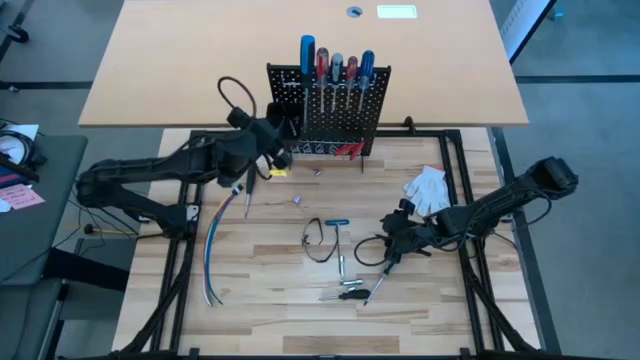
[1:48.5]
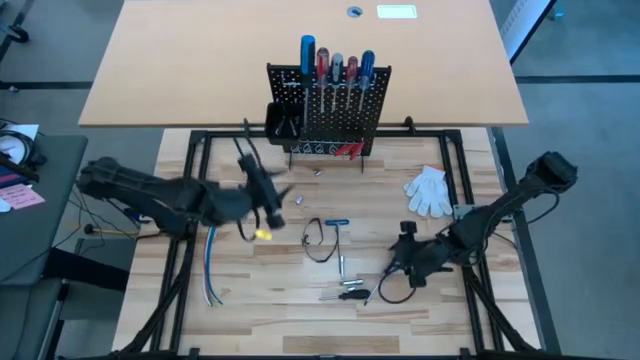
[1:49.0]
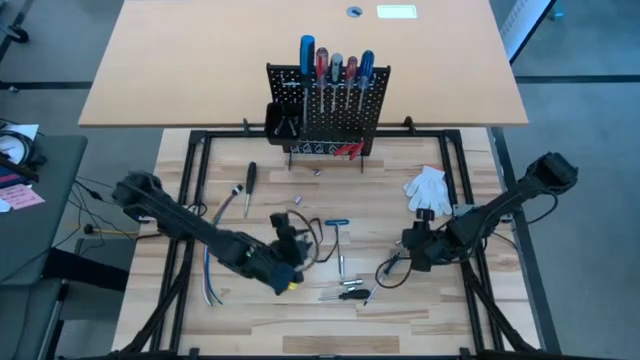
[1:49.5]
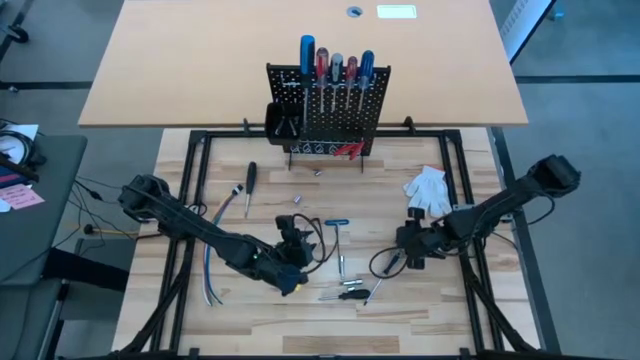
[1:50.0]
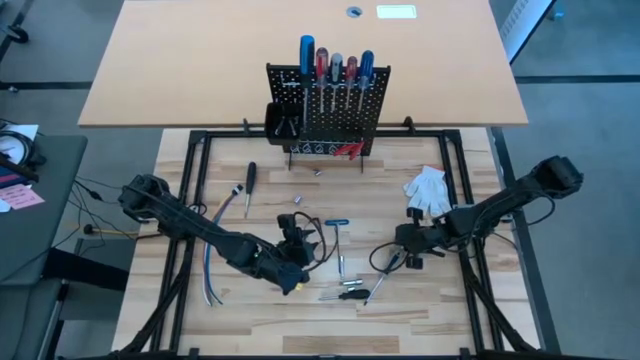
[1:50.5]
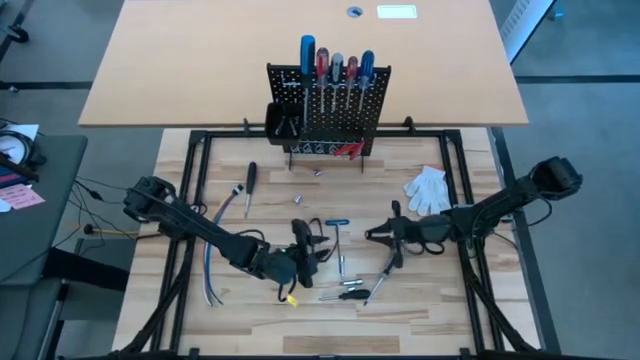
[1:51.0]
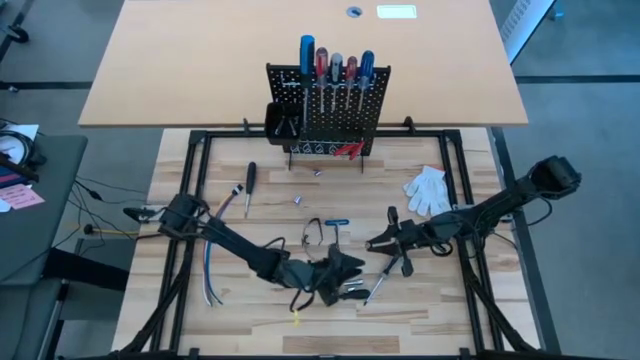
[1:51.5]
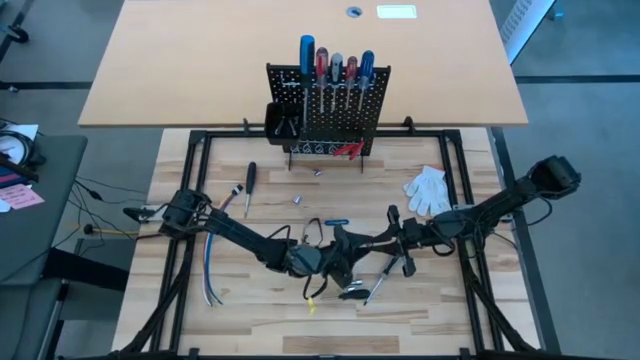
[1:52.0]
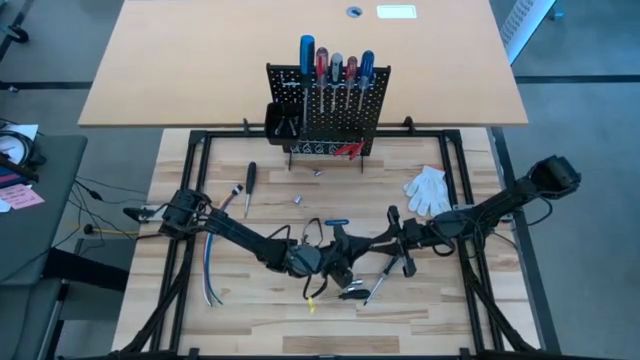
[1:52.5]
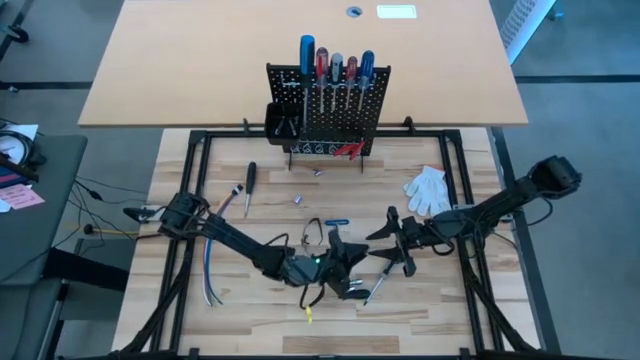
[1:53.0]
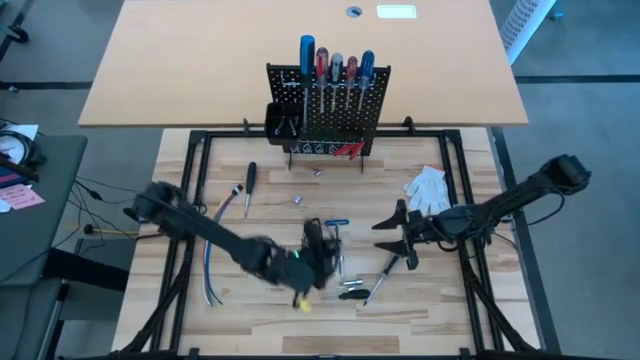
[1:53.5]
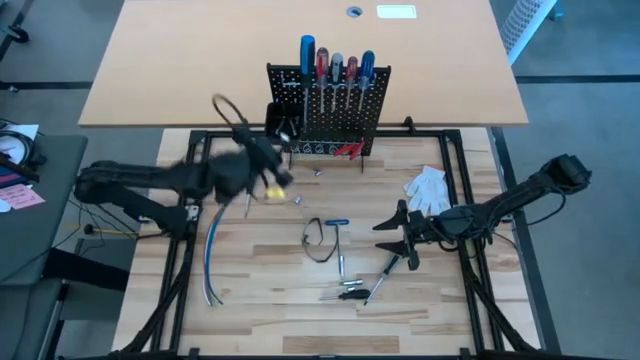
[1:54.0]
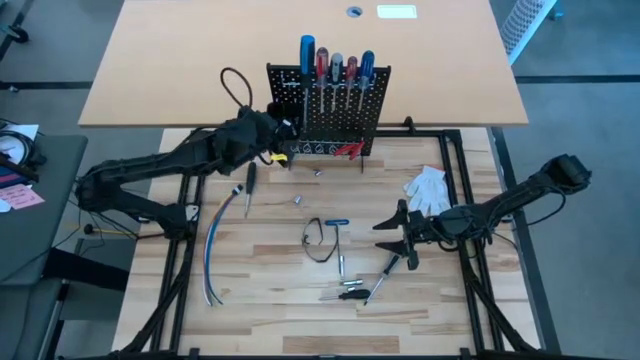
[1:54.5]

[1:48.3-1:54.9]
Task: Hang tools onto peg board
Put the silver socket into the black bin on the black pegboard

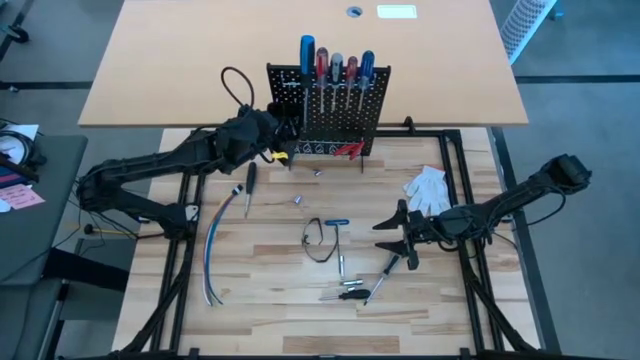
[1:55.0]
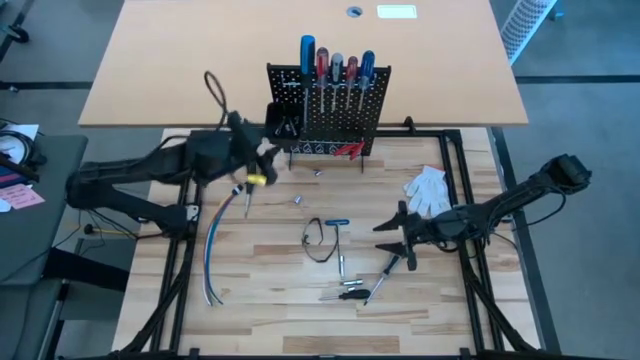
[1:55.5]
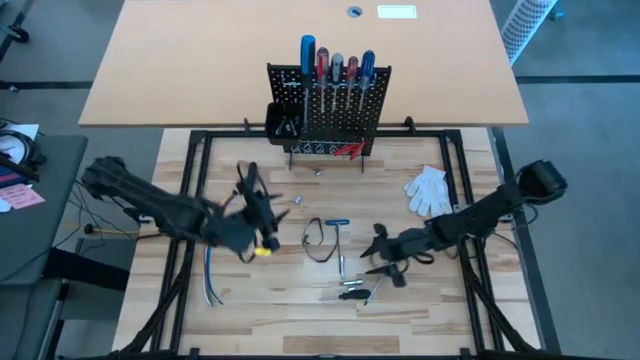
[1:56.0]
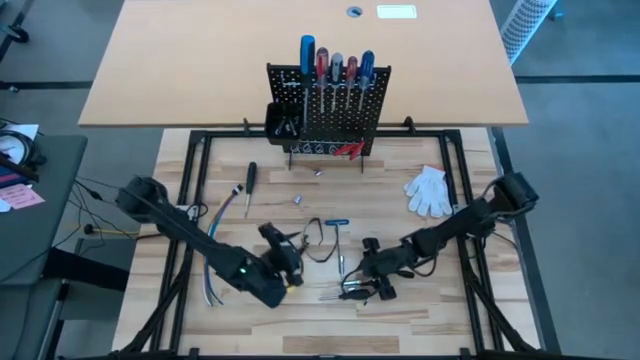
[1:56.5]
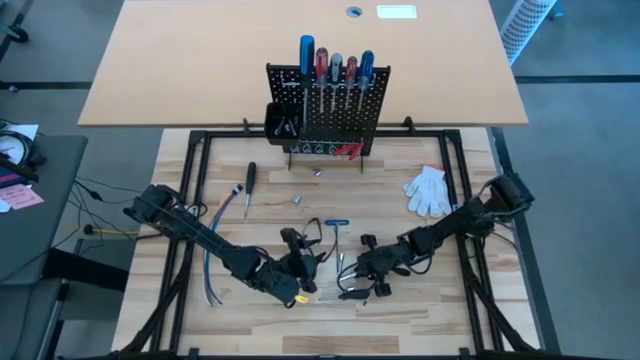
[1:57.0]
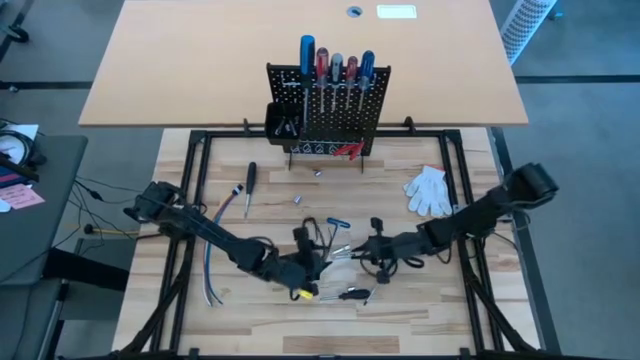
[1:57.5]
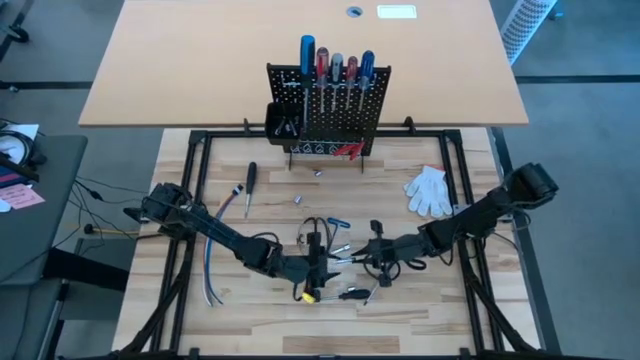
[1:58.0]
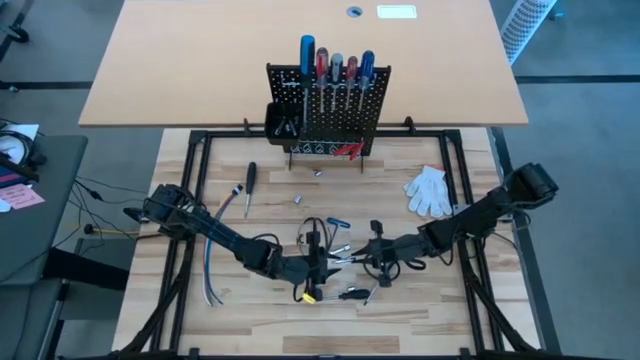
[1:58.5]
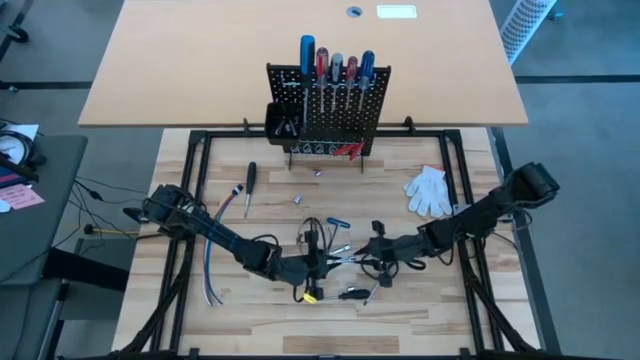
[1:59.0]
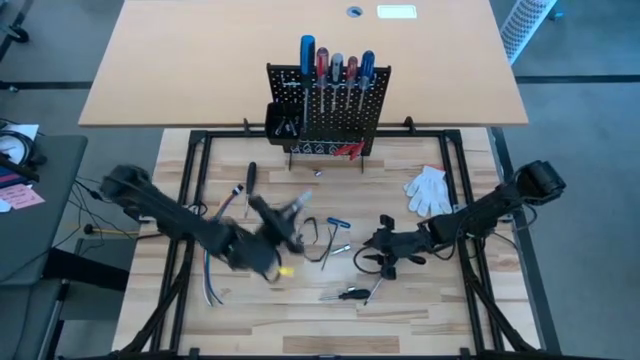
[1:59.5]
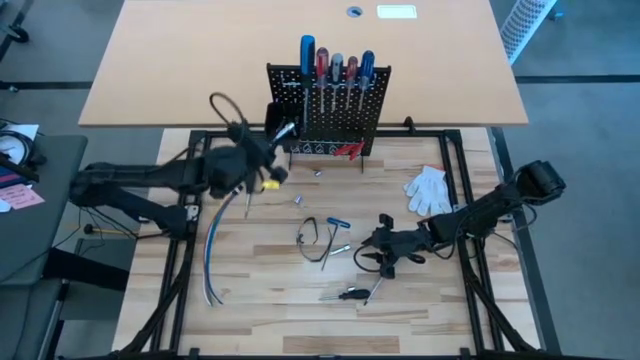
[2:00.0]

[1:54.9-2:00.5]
Put the silver extension bar into the black bin on the black pegboard

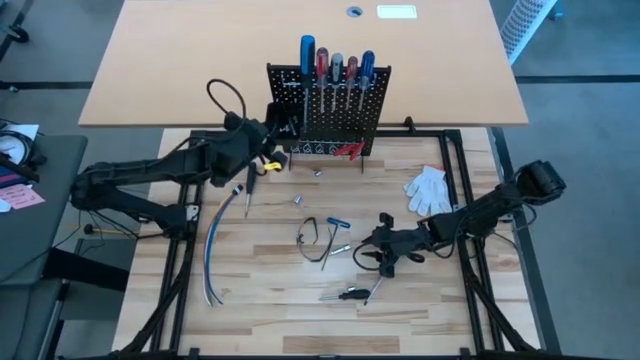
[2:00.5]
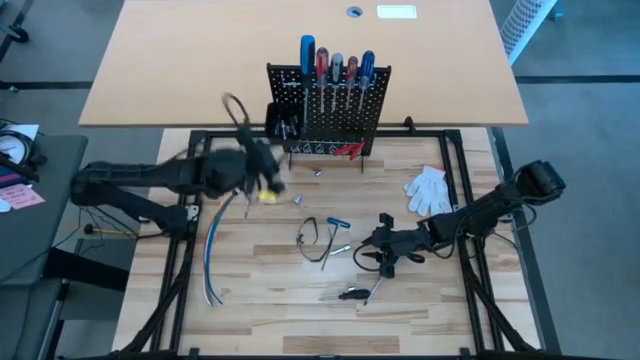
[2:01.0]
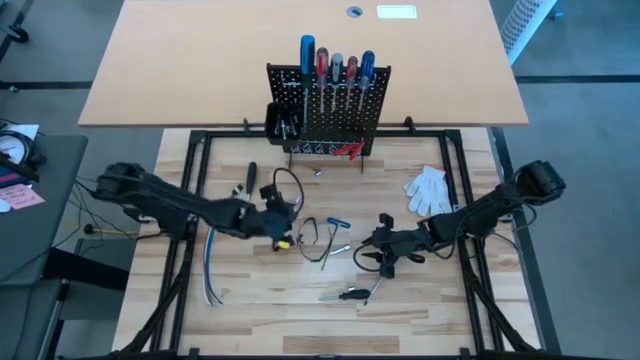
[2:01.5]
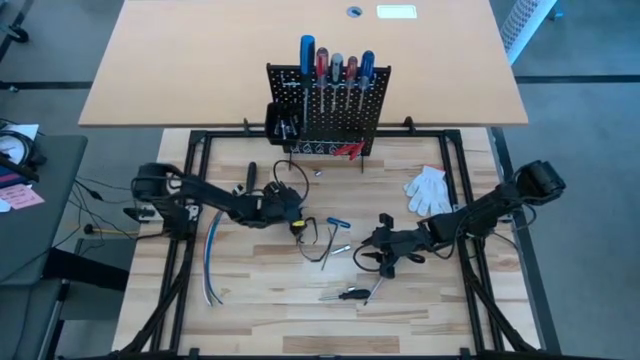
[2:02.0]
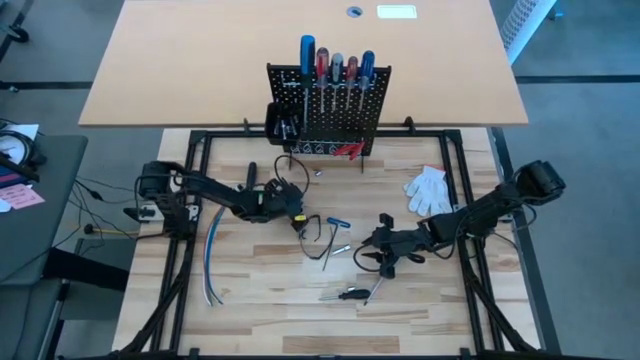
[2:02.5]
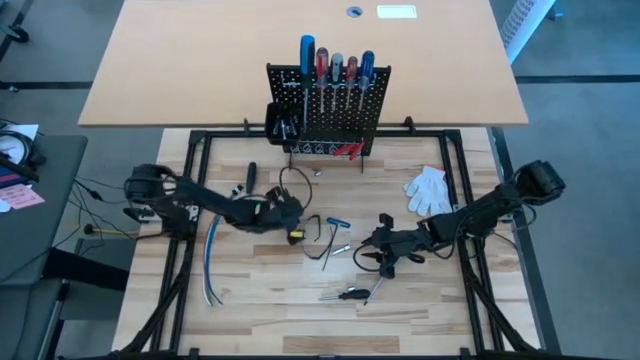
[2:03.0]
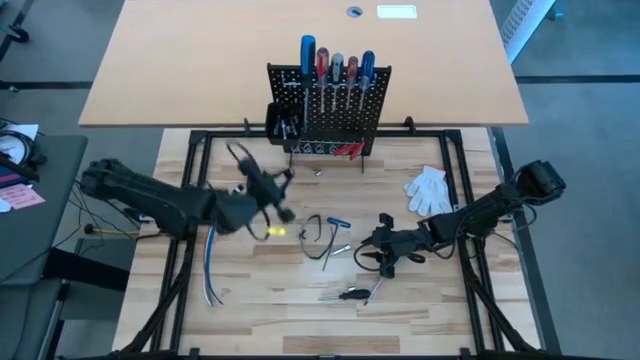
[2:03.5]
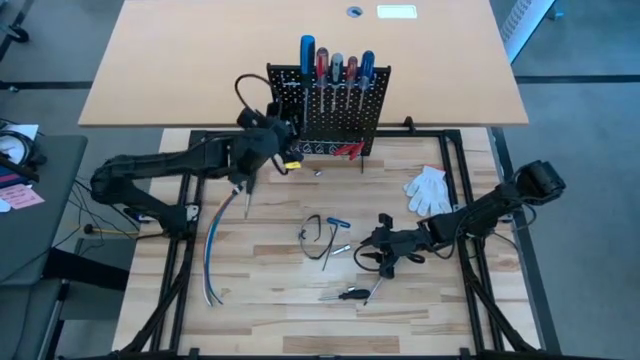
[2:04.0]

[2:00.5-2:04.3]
Put the silver socket into the black bin on the black pegboard

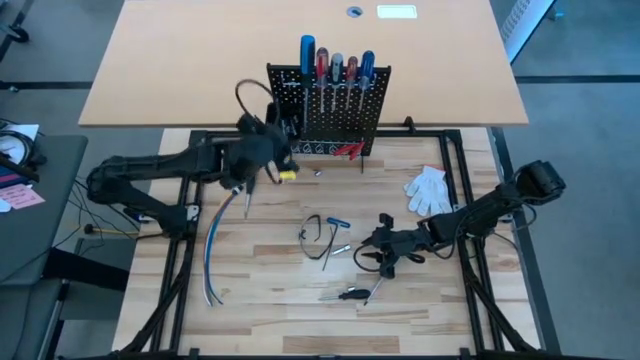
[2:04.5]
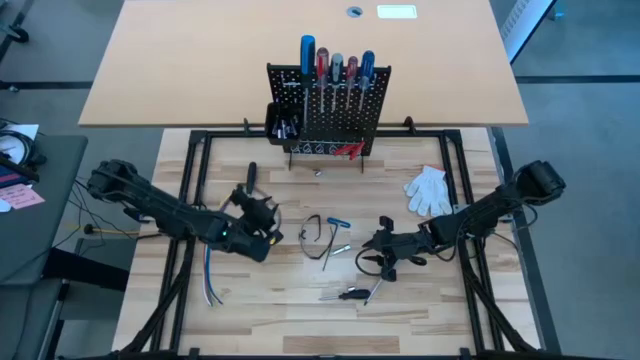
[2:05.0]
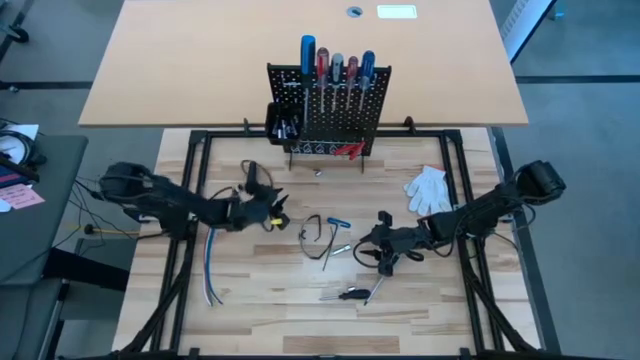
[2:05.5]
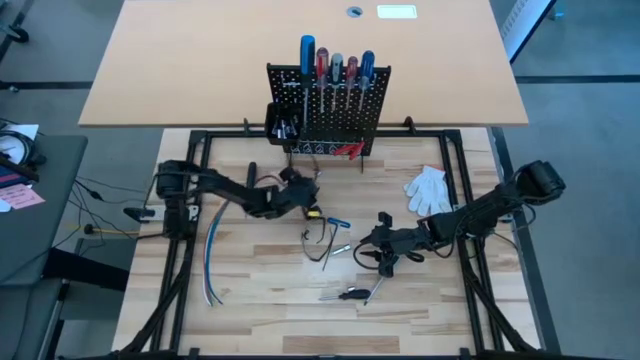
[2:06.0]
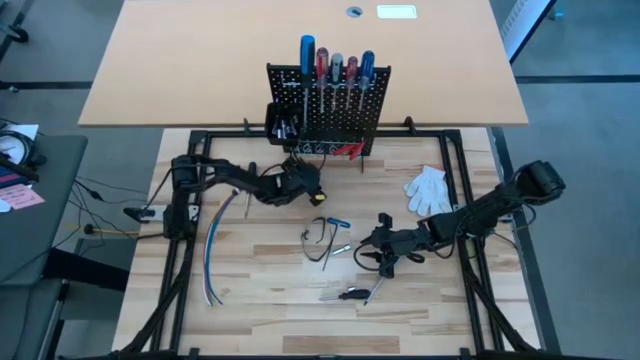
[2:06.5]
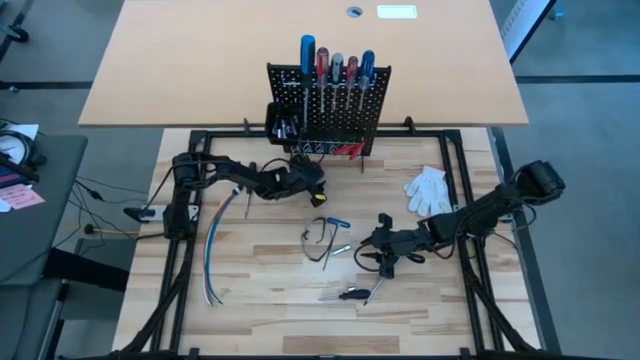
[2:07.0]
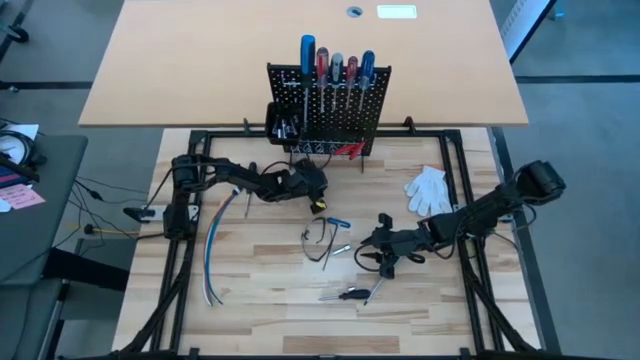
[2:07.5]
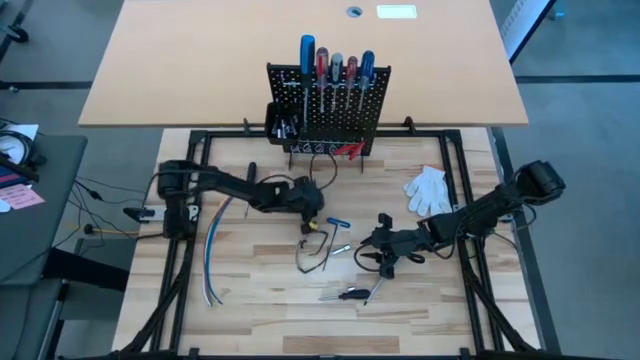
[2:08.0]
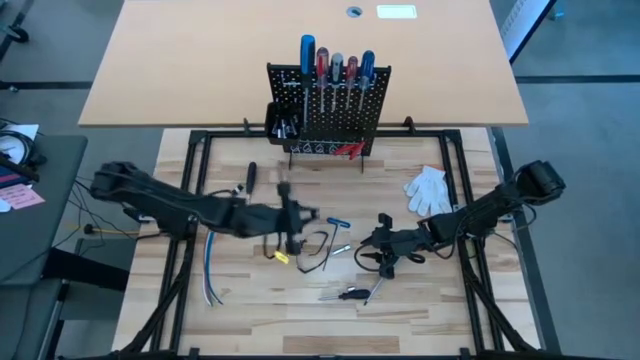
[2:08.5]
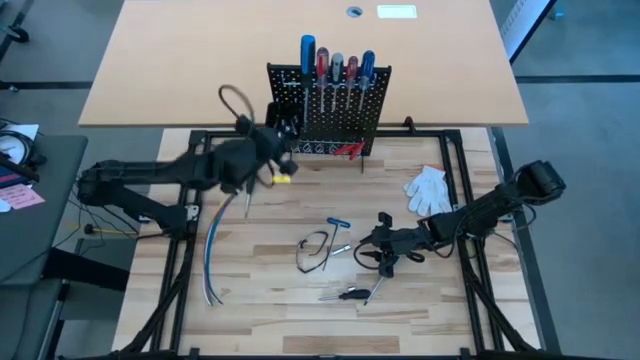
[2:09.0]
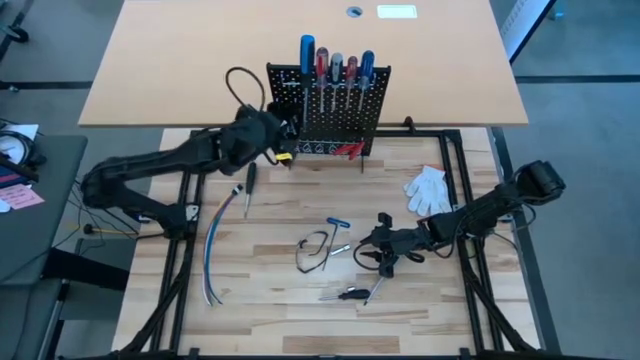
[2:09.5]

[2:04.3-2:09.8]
Put the top silver socket into the black bin on the black pegboard
